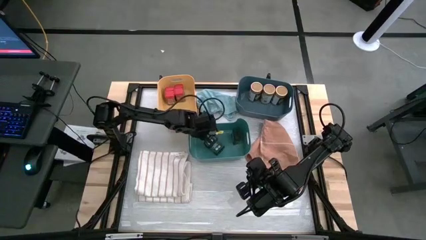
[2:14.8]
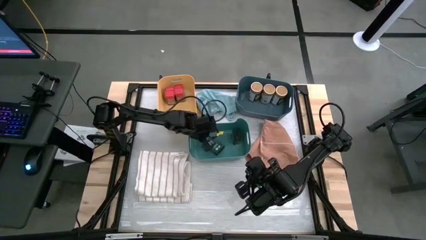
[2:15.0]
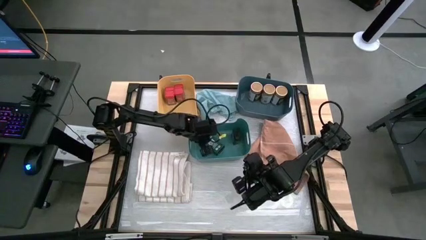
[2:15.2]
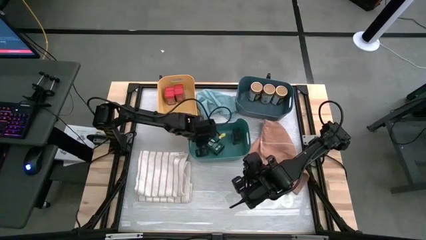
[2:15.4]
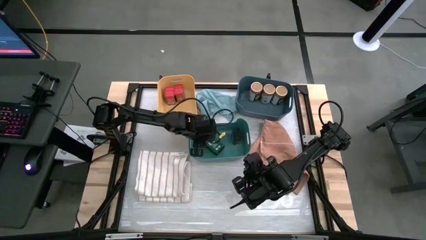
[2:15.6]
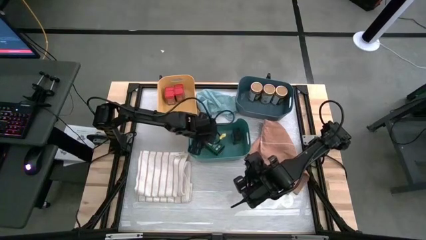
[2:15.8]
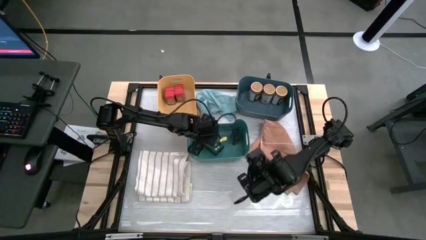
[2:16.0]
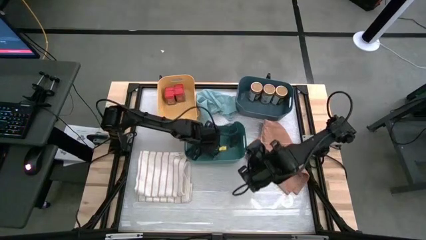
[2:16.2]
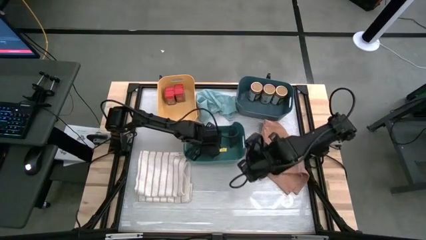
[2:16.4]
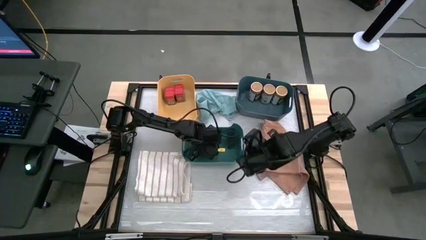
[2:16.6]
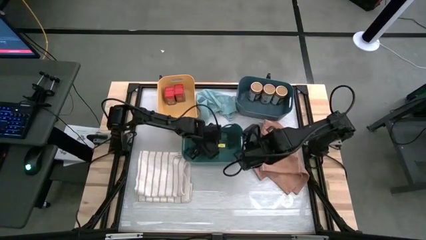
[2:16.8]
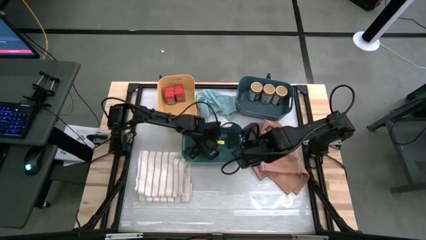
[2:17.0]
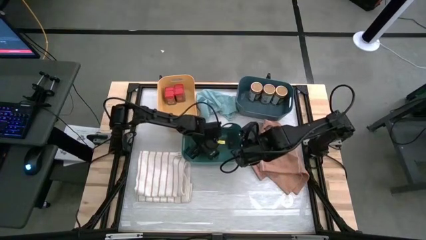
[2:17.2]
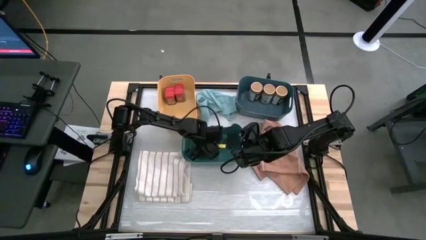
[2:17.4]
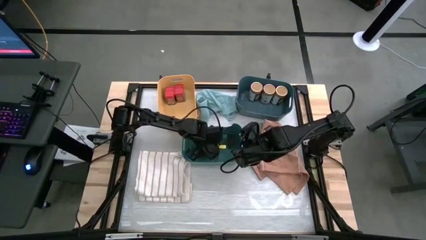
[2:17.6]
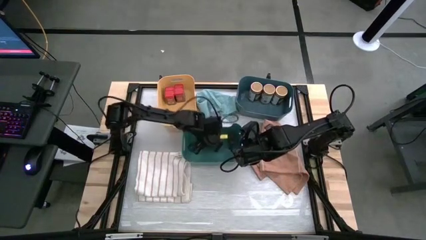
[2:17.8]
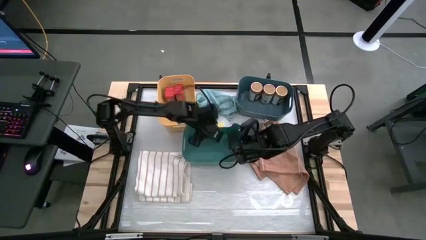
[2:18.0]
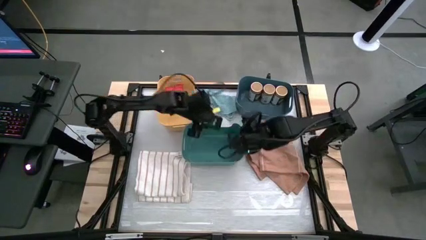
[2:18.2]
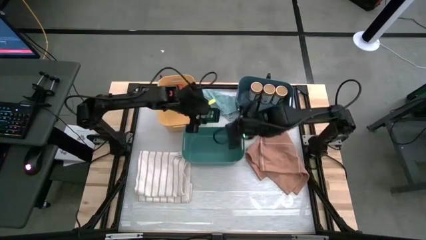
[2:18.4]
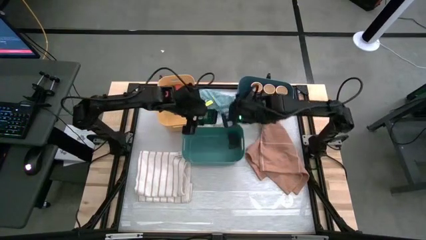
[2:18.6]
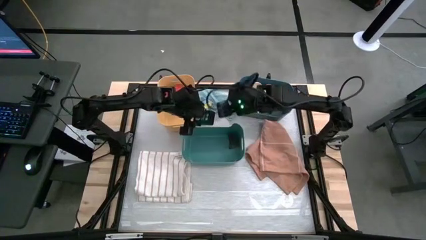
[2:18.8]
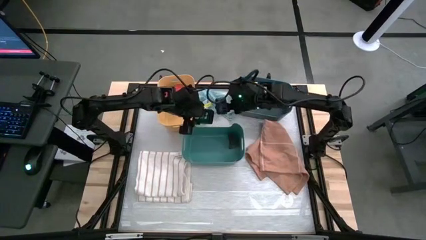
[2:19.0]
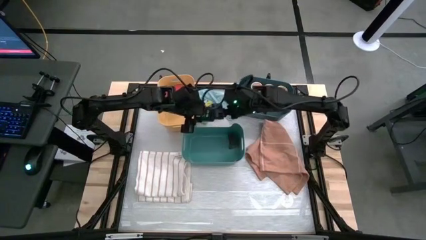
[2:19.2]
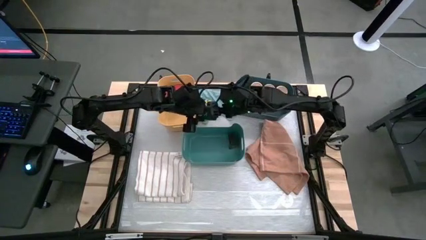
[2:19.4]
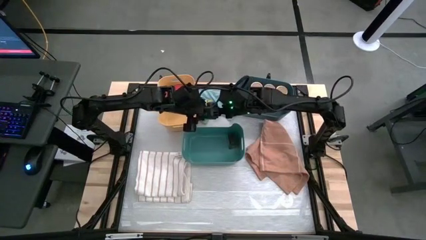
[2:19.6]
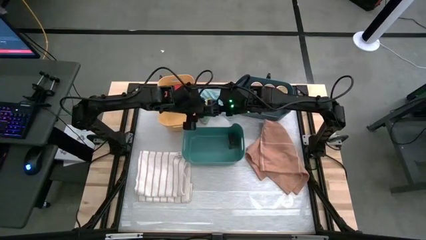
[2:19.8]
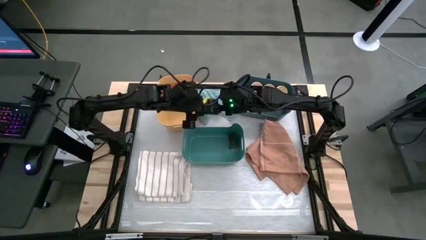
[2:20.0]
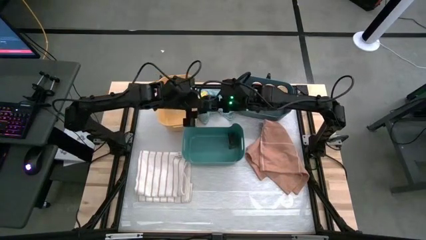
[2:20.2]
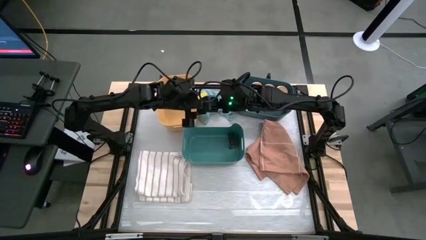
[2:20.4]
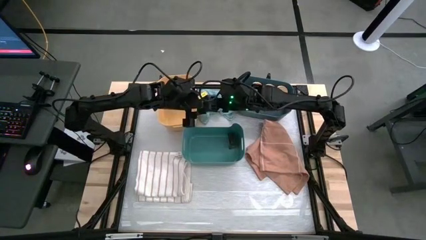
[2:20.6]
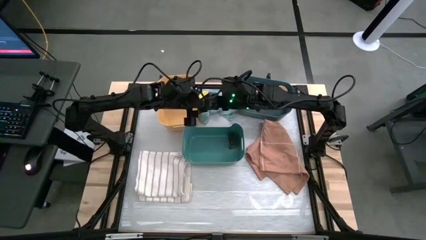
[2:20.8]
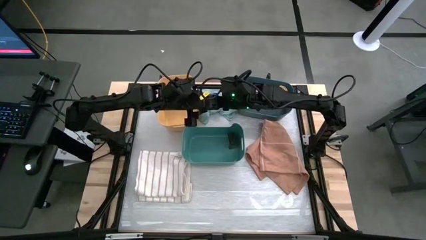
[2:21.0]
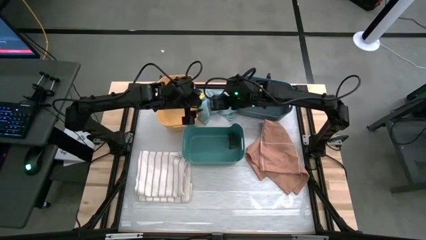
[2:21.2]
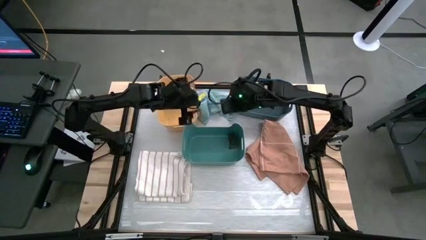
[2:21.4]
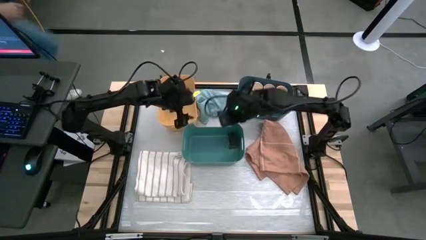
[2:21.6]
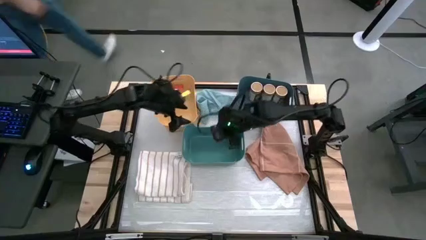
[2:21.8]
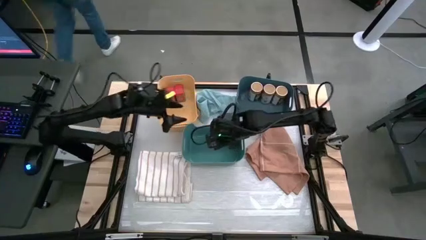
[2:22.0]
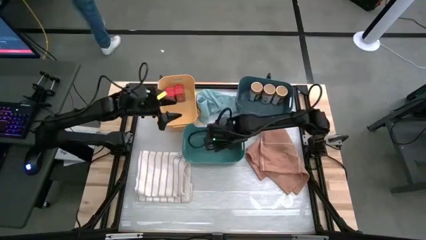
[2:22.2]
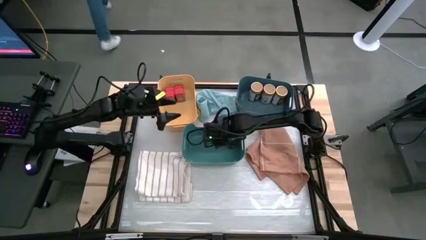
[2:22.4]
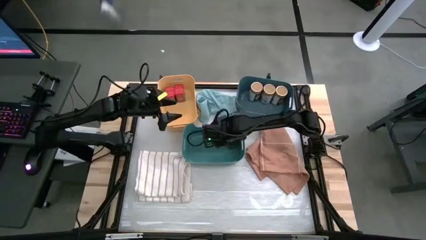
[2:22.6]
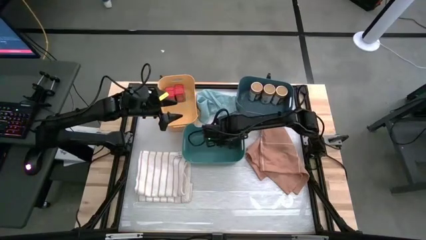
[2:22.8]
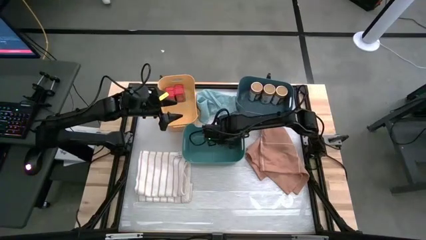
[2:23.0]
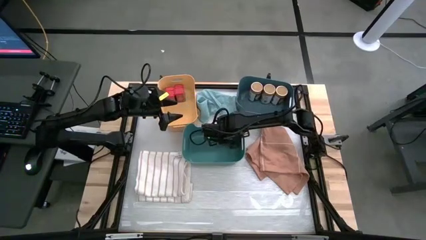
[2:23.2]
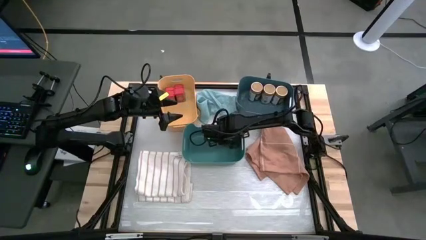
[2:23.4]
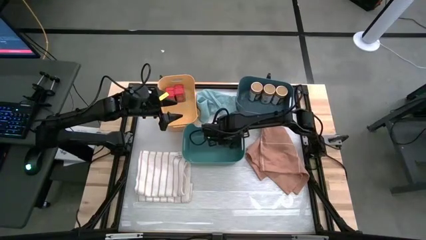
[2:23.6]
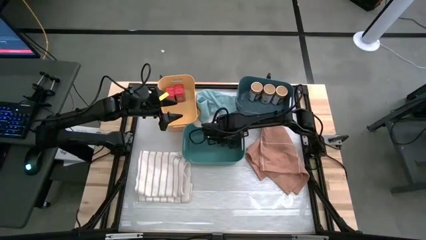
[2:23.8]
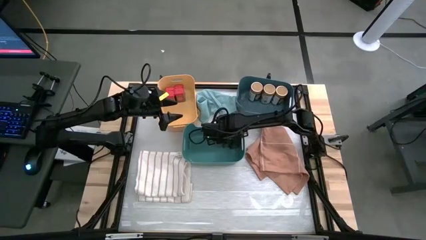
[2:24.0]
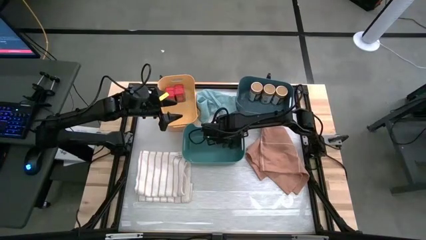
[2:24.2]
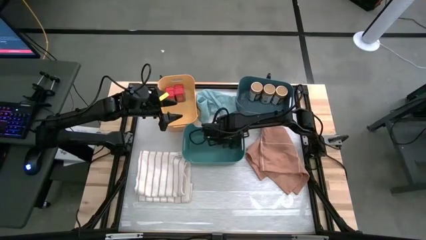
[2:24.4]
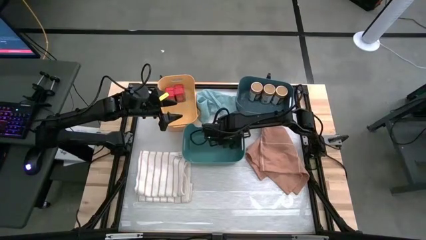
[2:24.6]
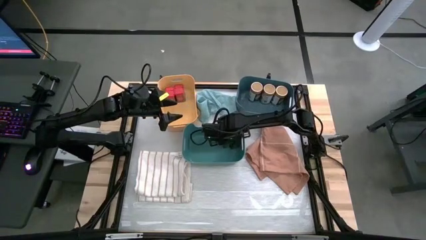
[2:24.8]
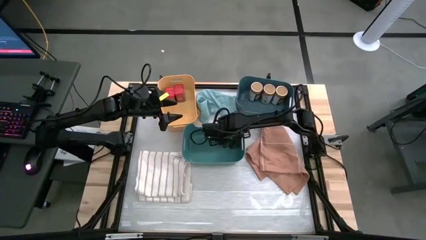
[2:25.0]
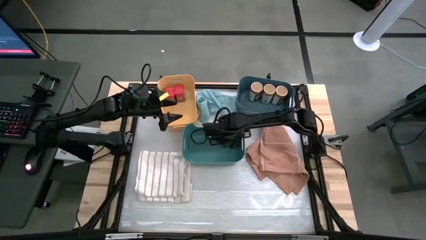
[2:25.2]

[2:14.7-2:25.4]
Task: Sort spices by type
Put the green seasoning can into the green bin
